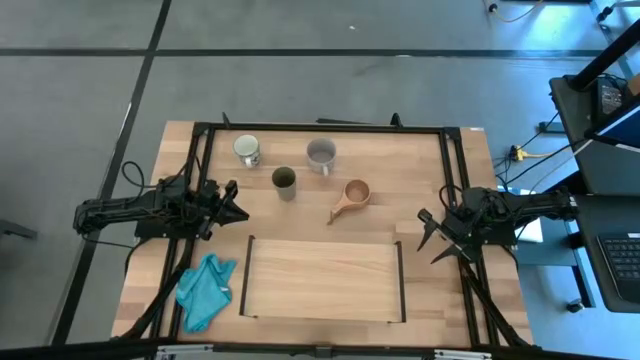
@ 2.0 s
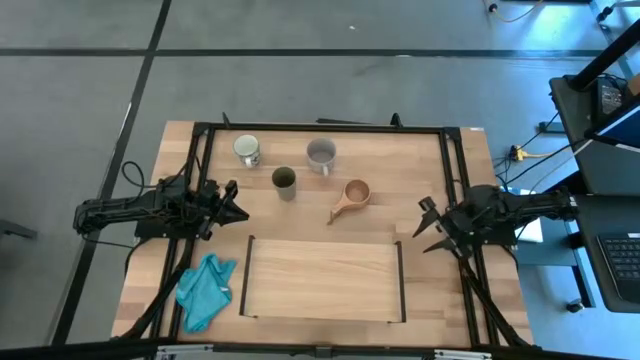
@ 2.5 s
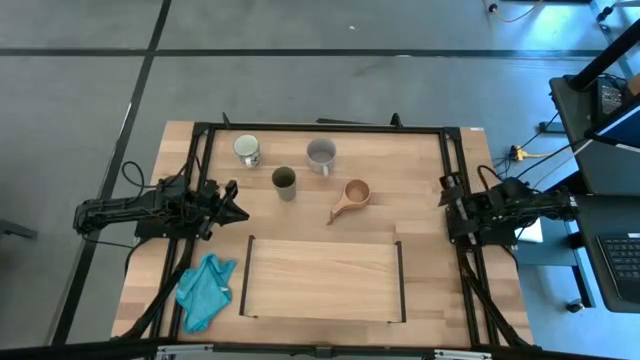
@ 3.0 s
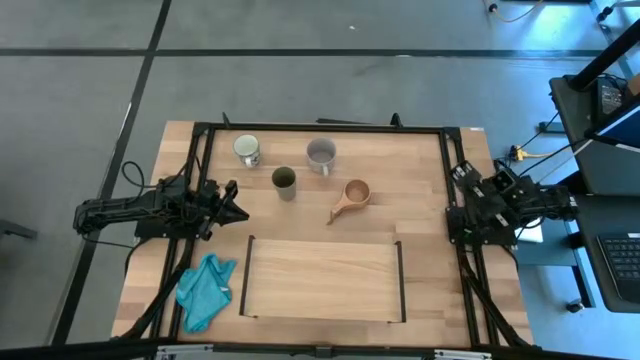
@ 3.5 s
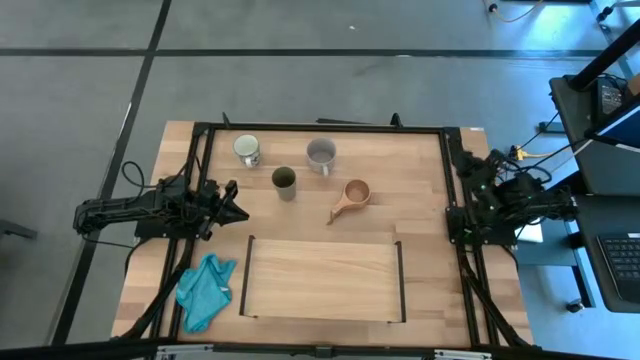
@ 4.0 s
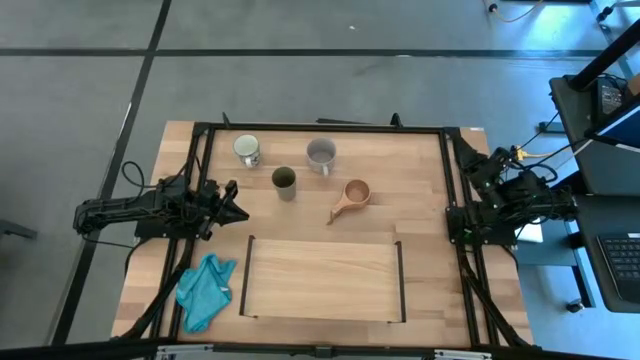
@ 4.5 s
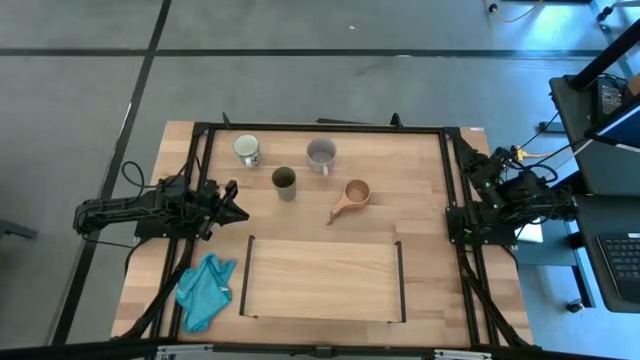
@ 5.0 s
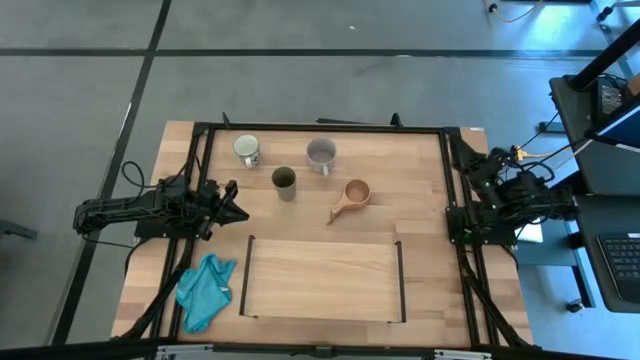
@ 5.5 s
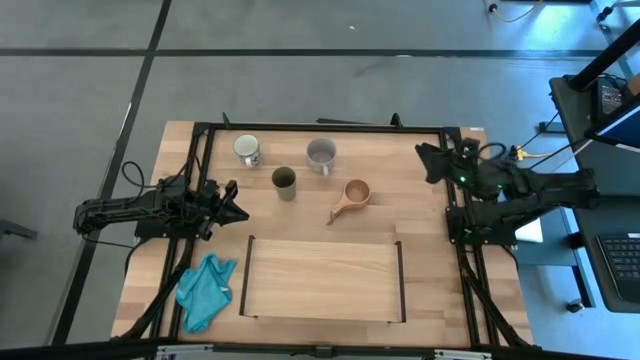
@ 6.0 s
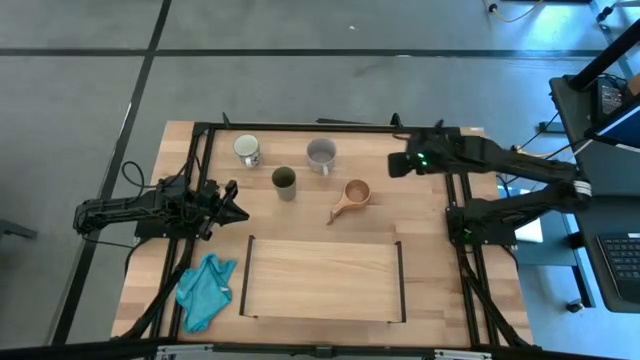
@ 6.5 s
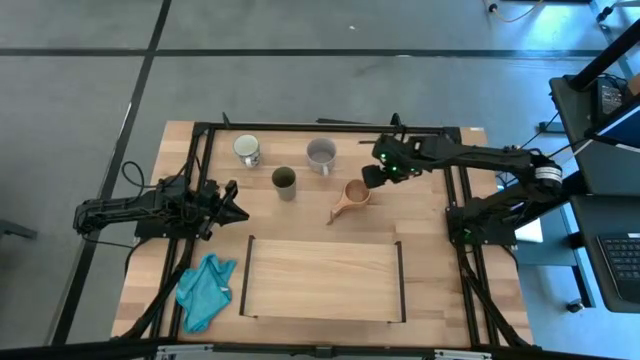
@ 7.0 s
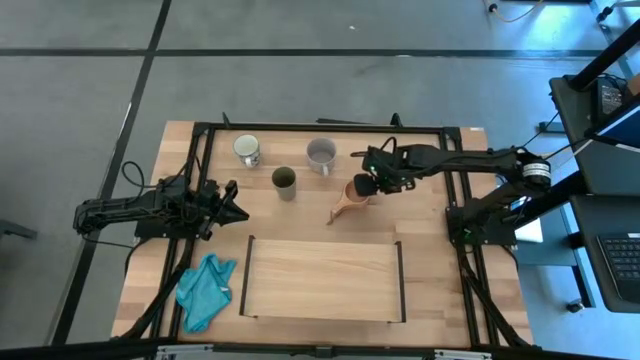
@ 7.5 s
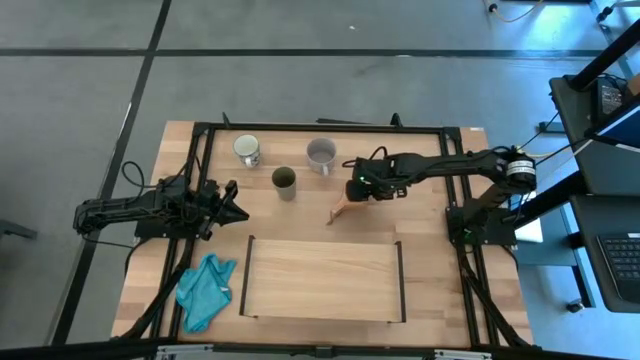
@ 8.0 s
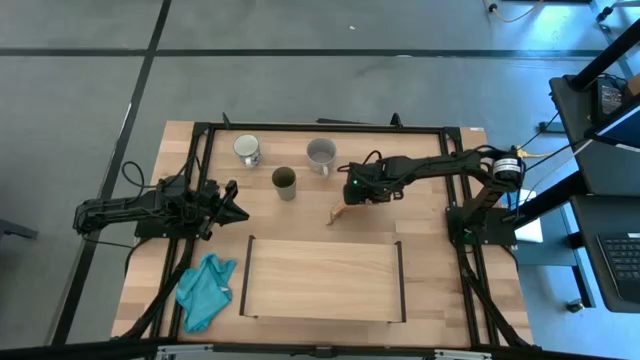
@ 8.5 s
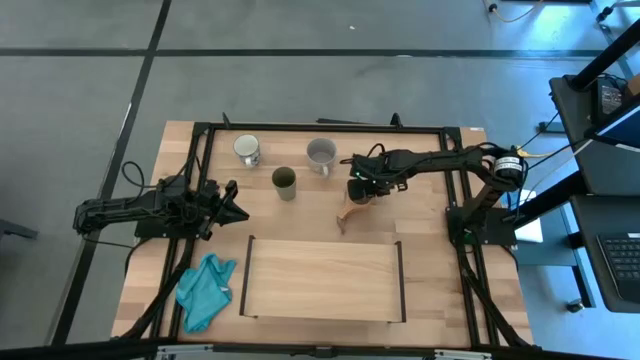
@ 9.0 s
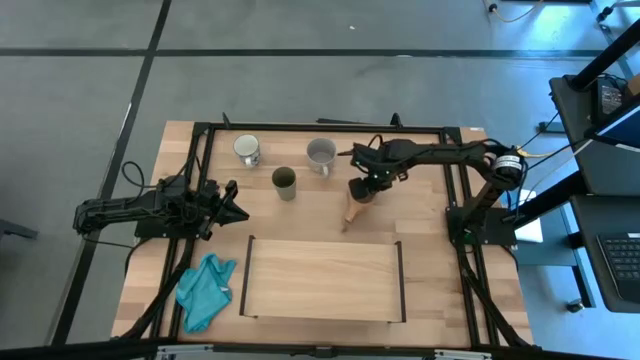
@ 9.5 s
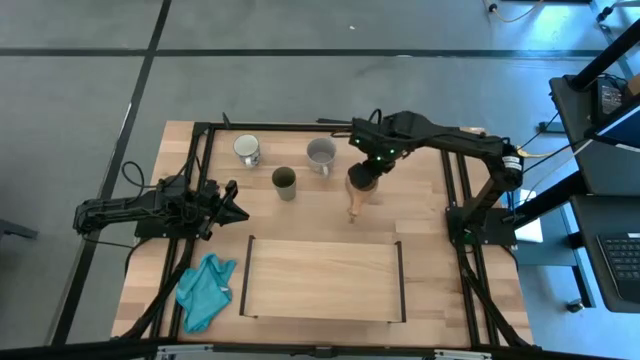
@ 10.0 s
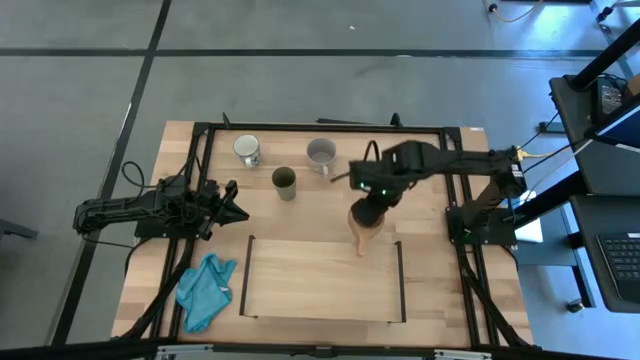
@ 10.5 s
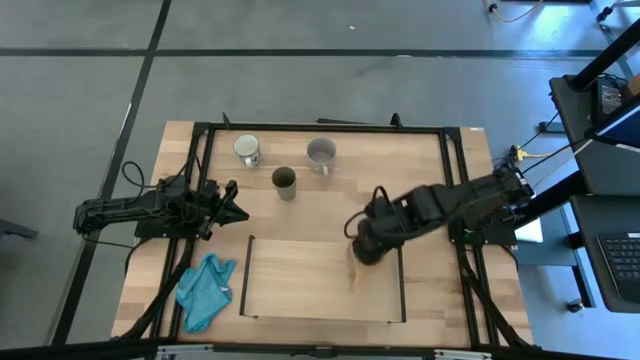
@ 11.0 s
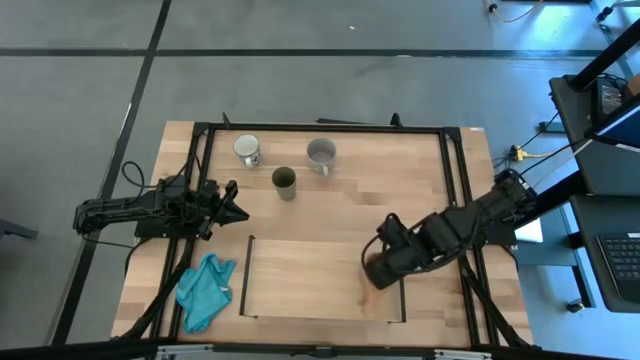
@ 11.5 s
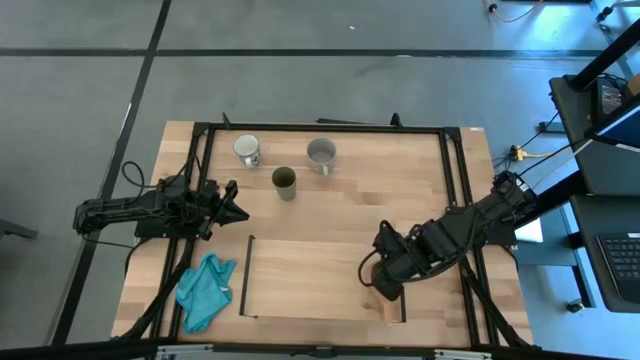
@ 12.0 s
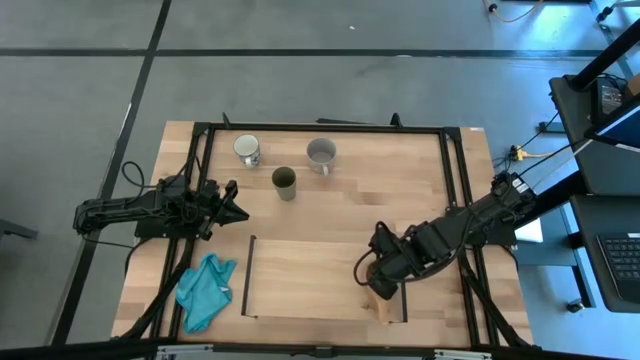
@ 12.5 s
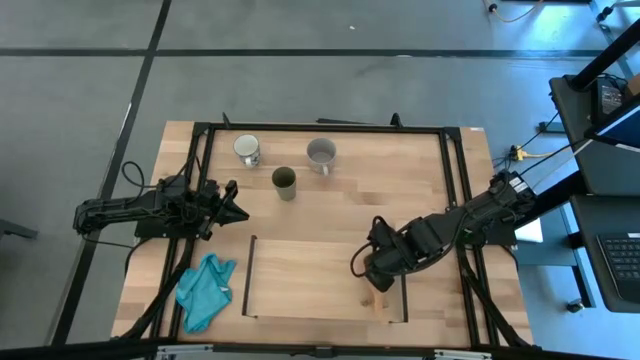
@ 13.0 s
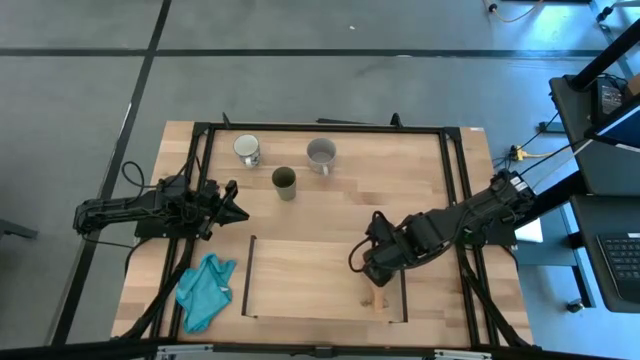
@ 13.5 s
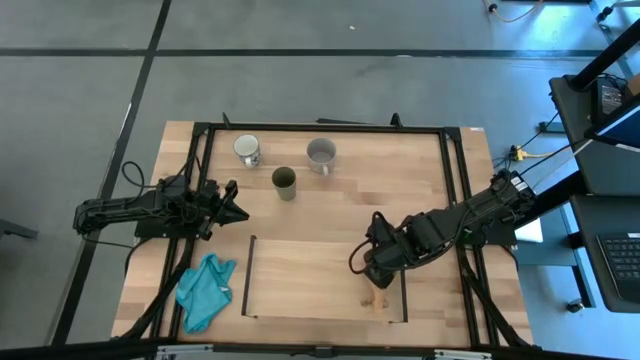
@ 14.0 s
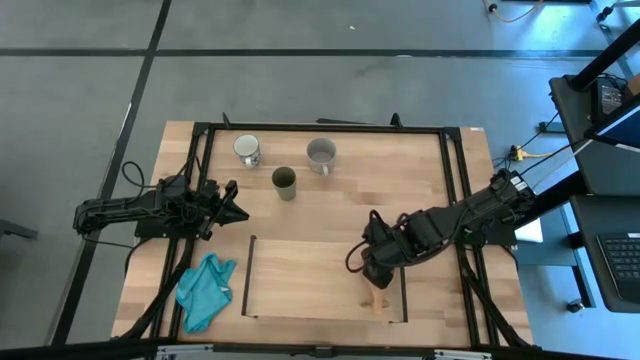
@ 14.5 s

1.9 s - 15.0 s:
Task: Stack small to large cups/mugs on shelf
Put the brown cup on the shelf

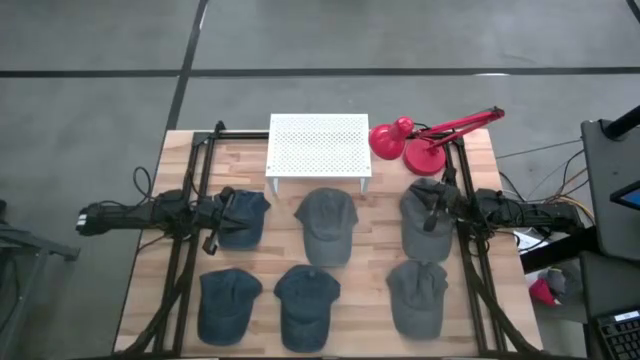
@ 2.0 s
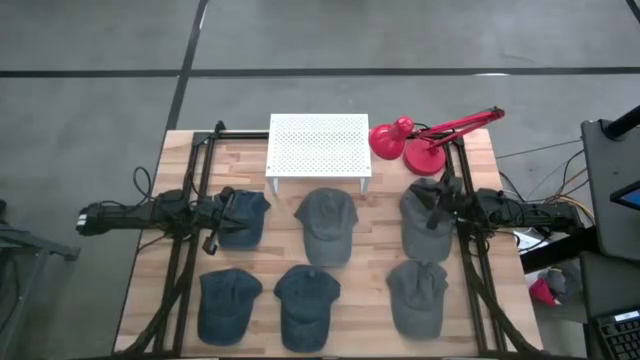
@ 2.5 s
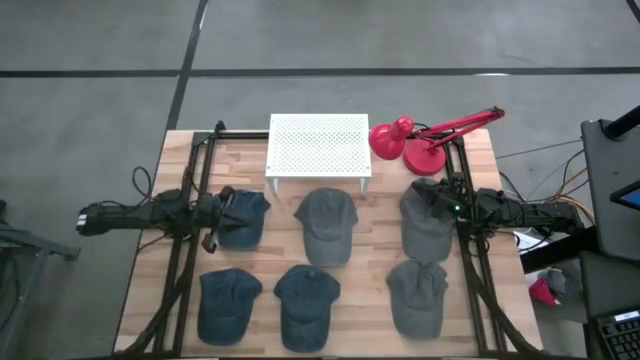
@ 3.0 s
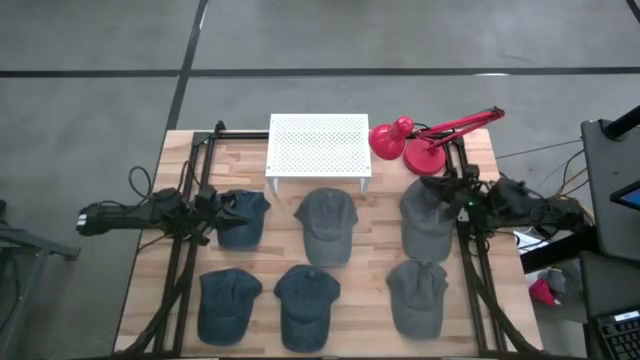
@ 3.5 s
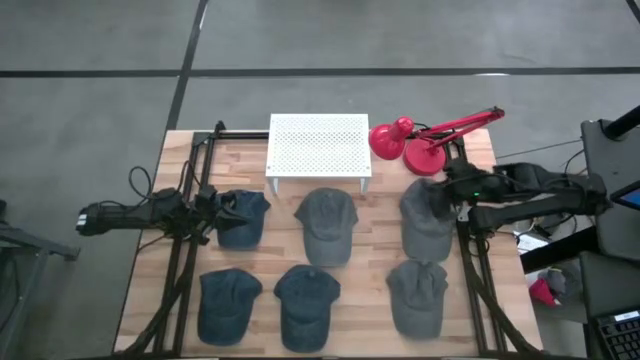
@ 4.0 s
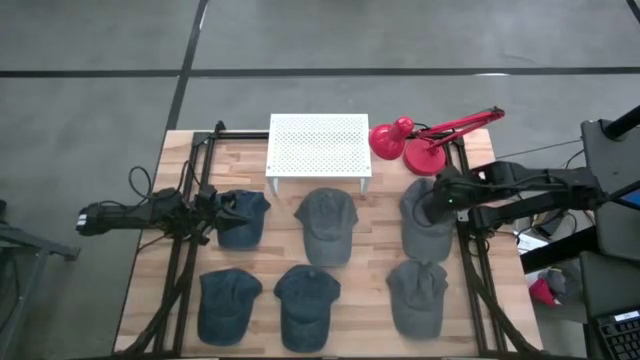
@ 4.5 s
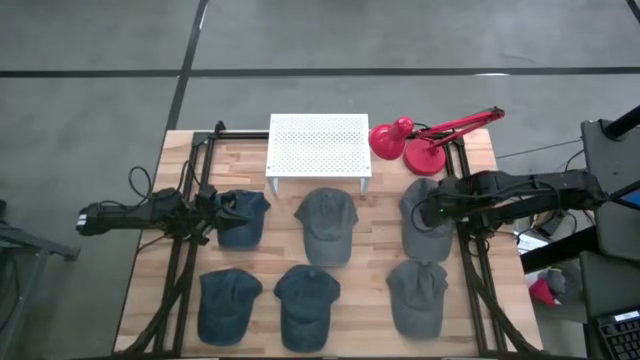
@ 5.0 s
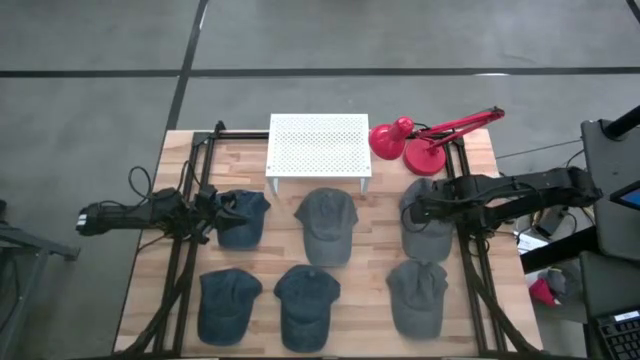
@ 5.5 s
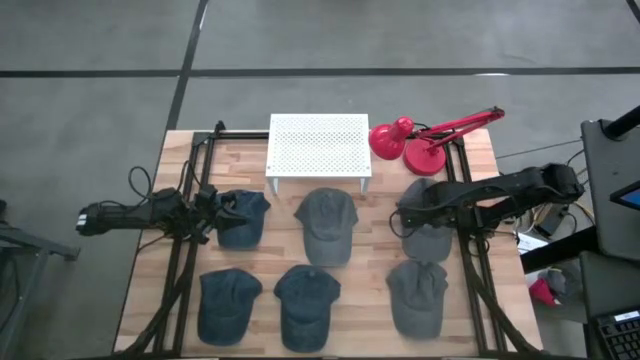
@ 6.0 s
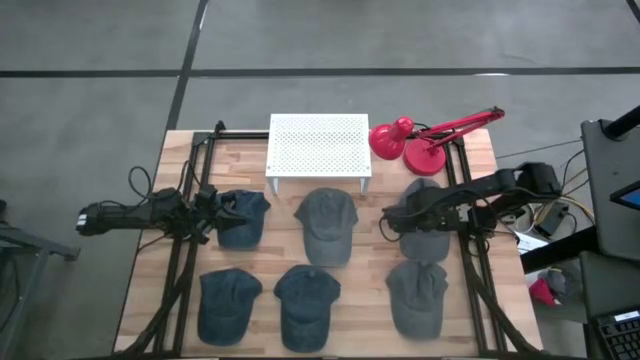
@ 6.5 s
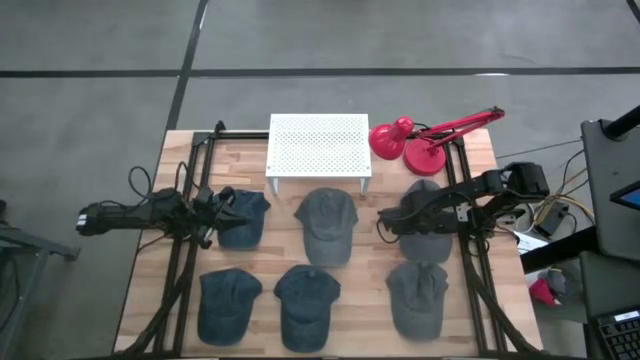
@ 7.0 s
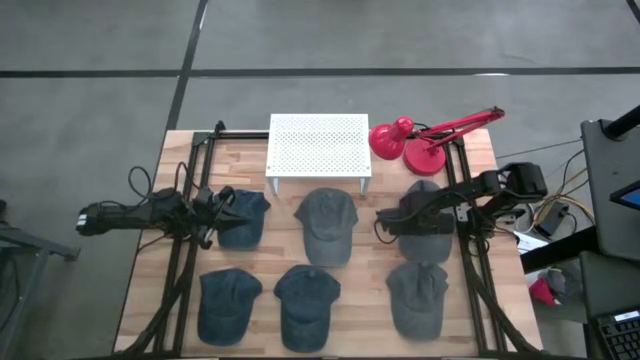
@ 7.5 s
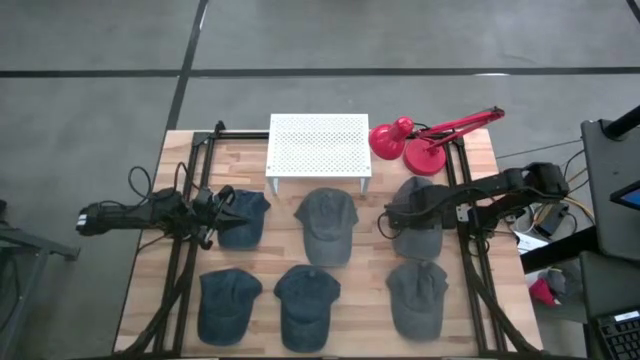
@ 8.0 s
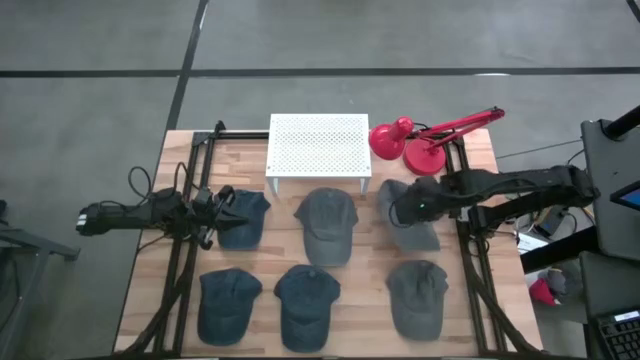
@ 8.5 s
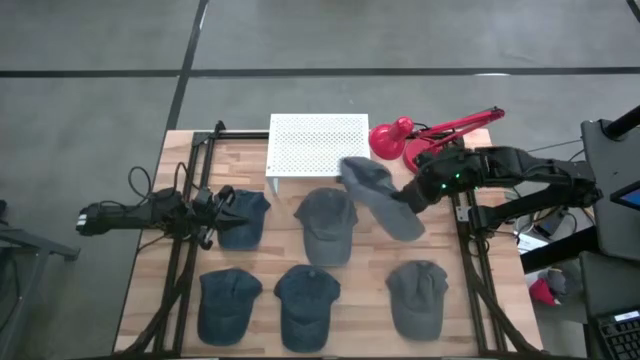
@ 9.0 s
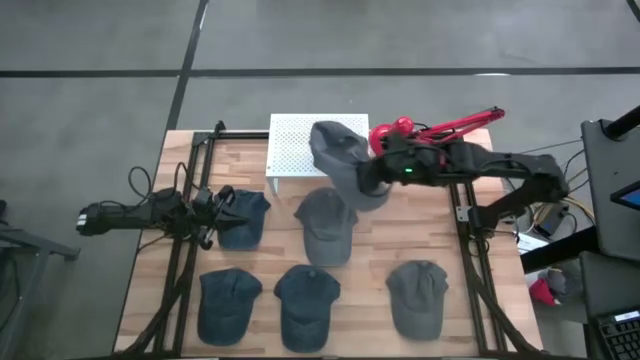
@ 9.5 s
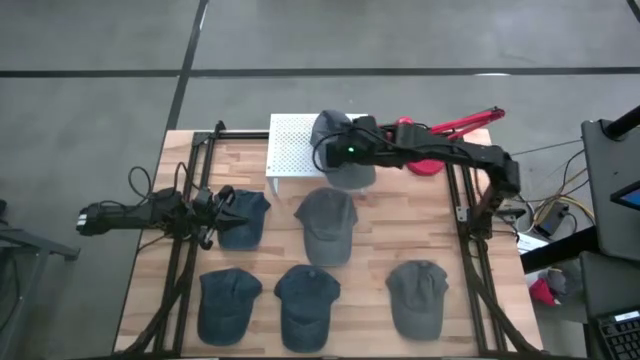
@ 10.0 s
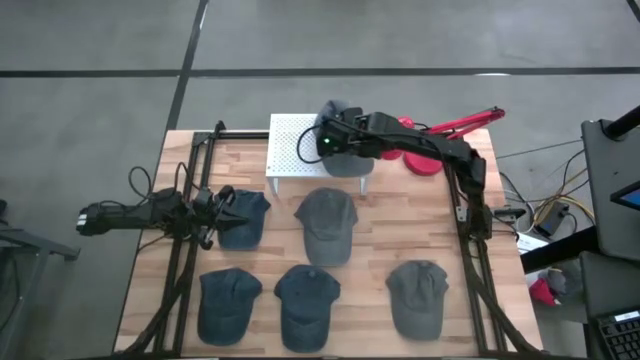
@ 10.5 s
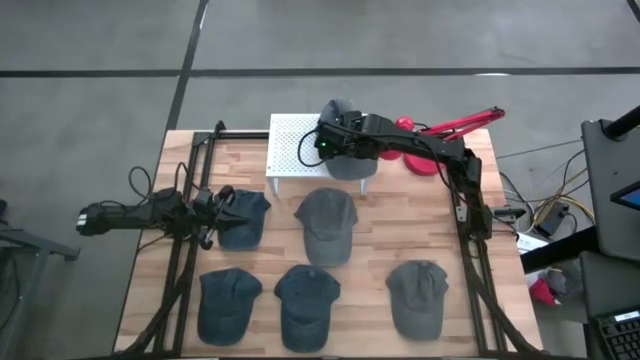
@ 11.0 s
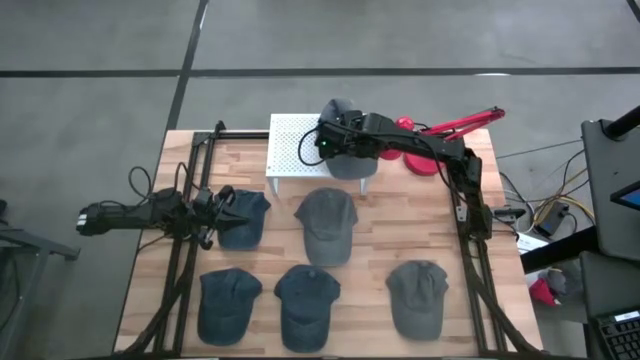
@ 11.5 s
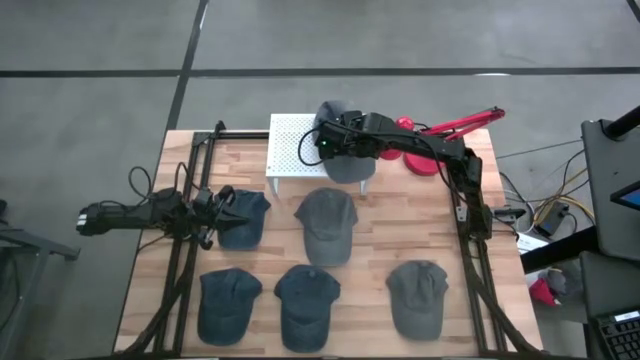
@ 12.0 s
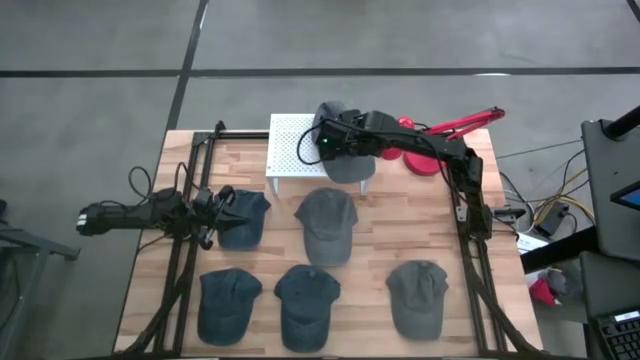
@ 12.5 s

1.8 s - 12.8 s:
Task: Pick & Place hat
Put the top gray cap on the shelf
